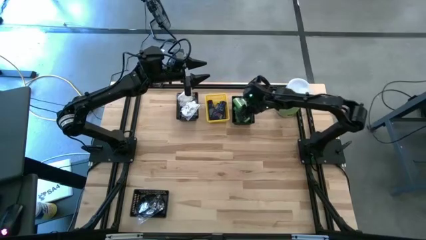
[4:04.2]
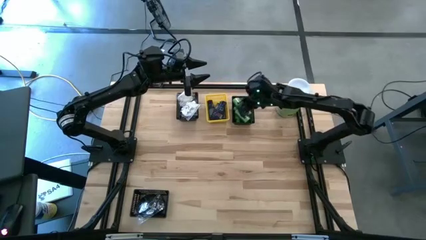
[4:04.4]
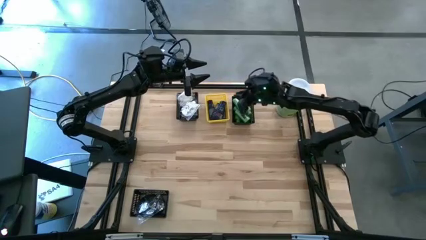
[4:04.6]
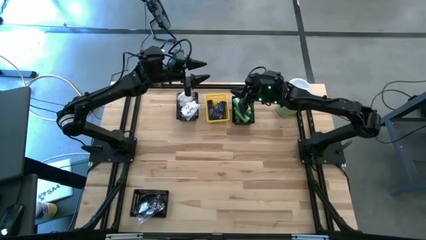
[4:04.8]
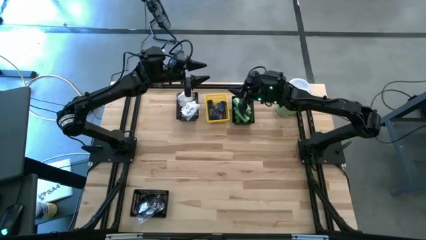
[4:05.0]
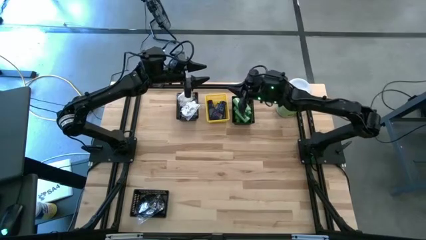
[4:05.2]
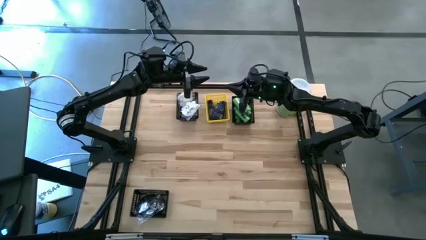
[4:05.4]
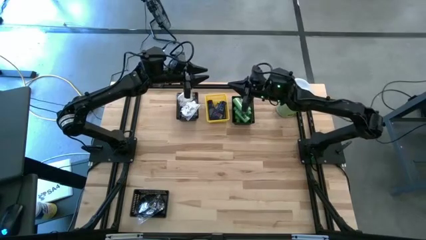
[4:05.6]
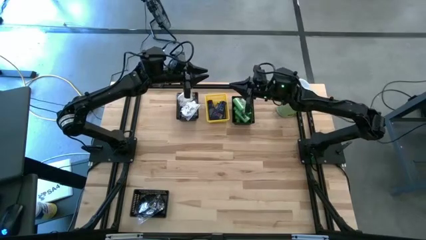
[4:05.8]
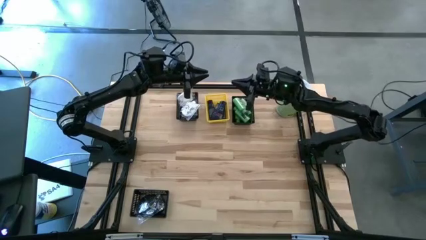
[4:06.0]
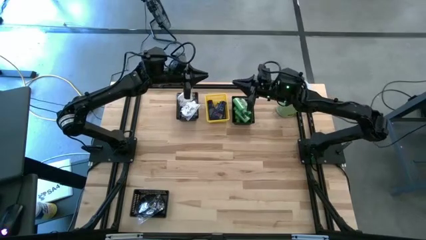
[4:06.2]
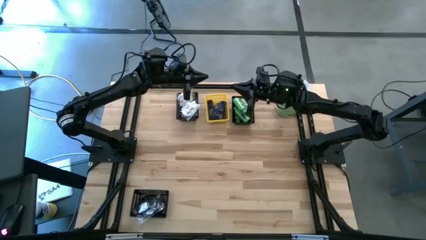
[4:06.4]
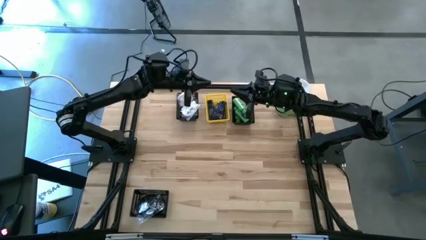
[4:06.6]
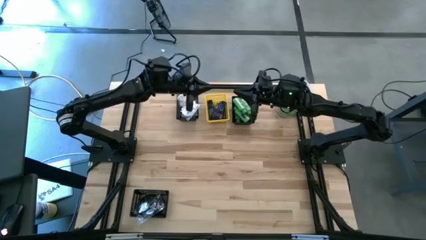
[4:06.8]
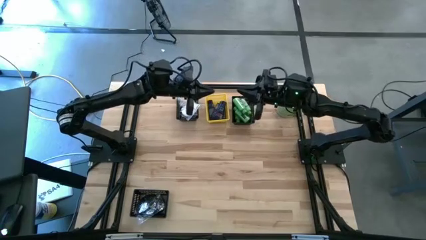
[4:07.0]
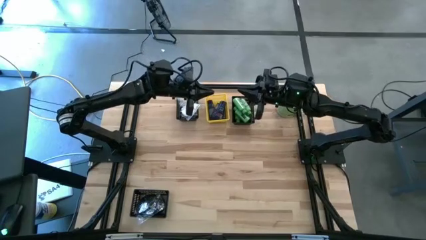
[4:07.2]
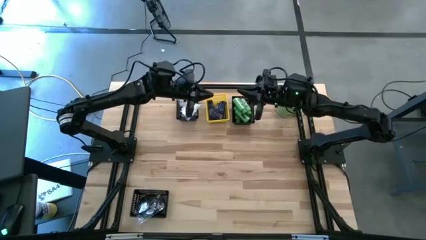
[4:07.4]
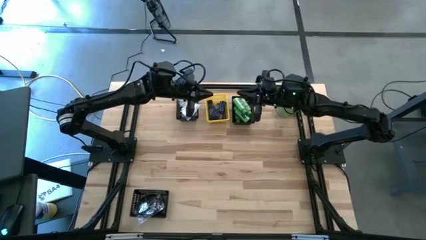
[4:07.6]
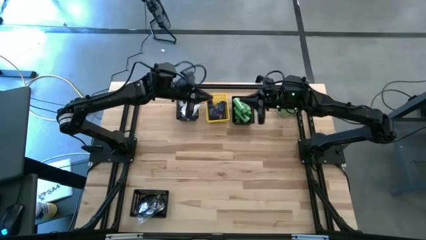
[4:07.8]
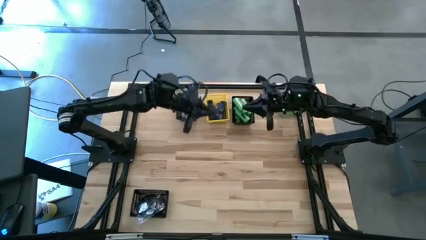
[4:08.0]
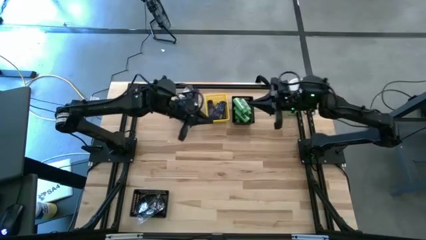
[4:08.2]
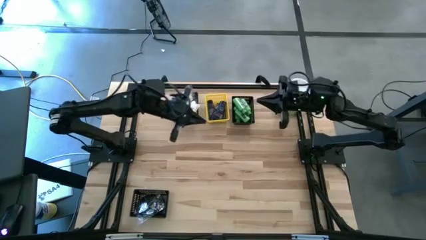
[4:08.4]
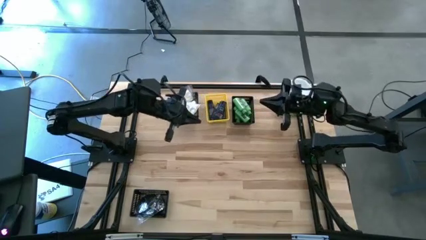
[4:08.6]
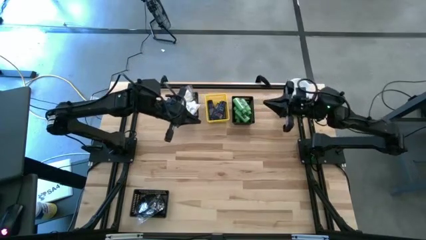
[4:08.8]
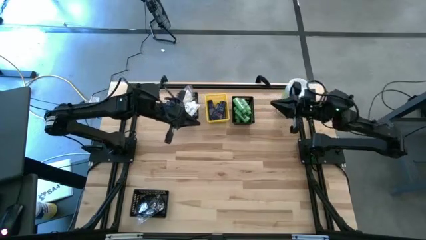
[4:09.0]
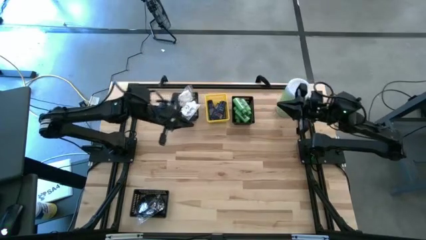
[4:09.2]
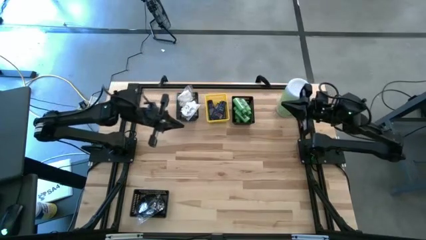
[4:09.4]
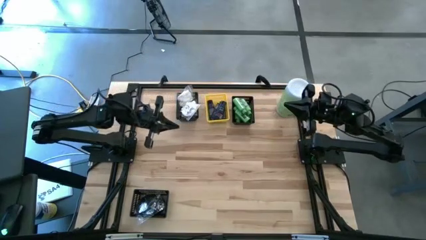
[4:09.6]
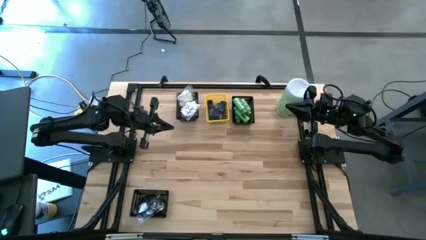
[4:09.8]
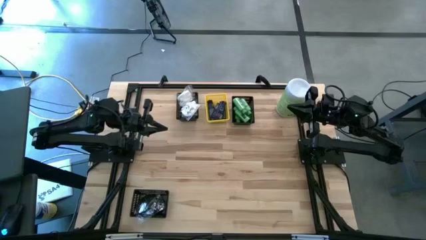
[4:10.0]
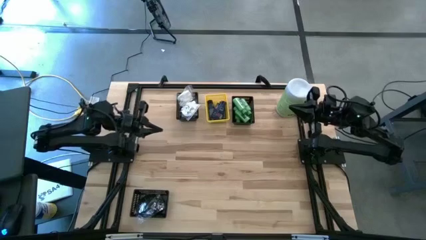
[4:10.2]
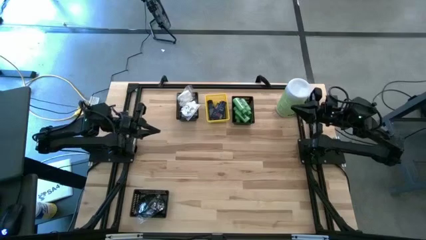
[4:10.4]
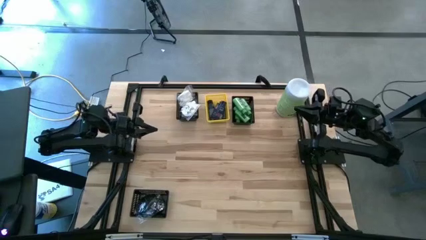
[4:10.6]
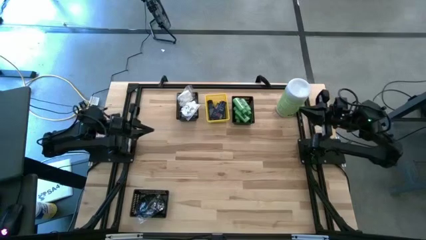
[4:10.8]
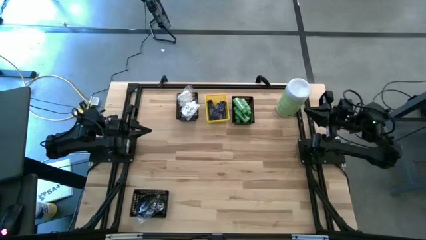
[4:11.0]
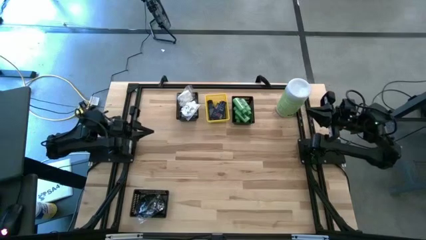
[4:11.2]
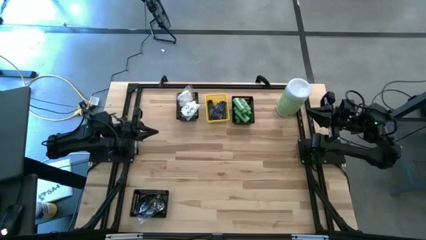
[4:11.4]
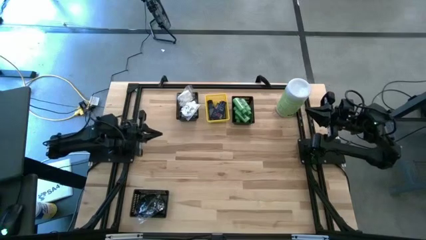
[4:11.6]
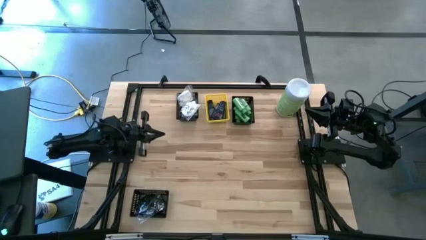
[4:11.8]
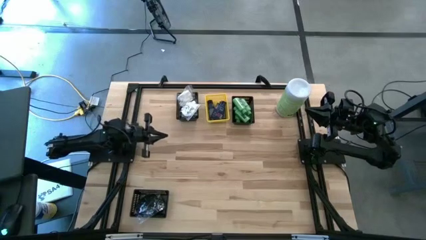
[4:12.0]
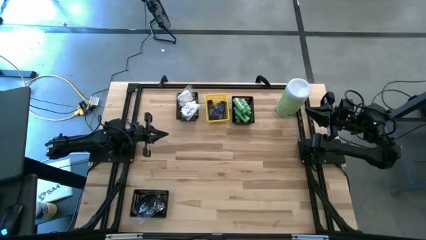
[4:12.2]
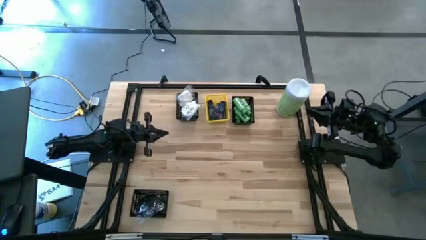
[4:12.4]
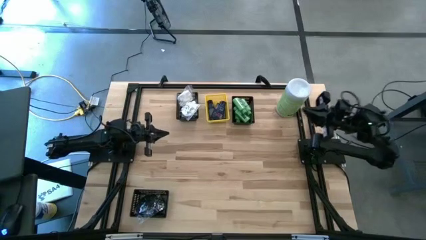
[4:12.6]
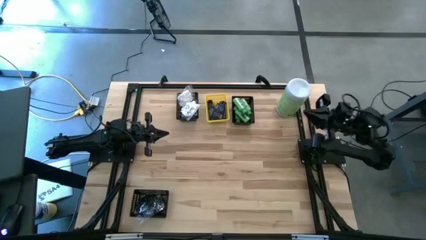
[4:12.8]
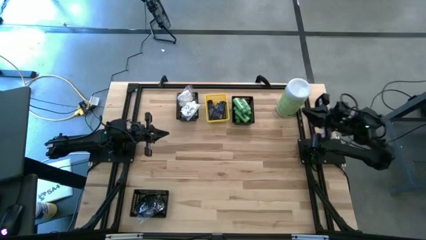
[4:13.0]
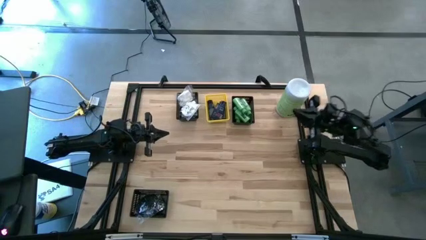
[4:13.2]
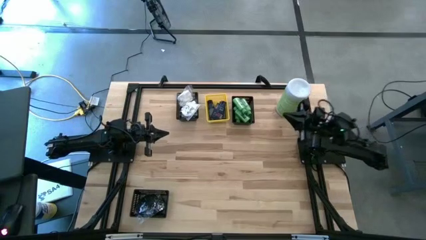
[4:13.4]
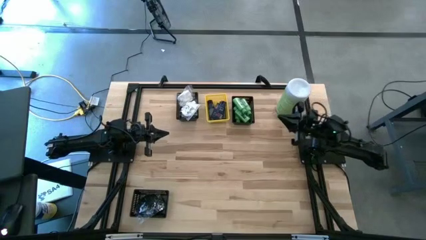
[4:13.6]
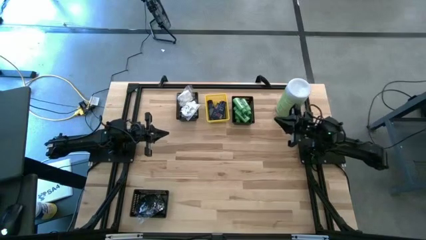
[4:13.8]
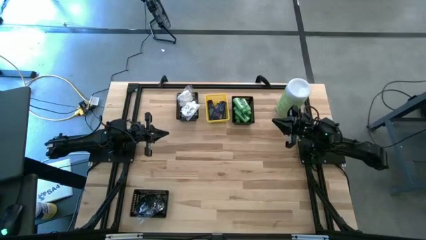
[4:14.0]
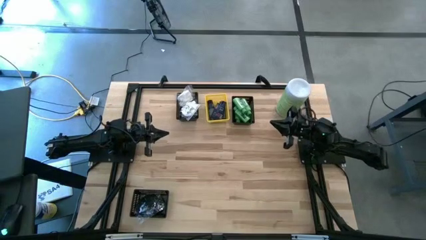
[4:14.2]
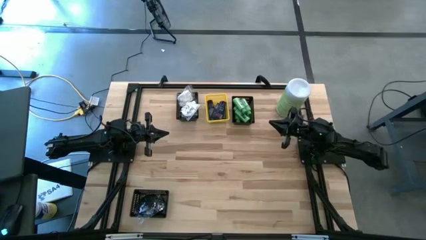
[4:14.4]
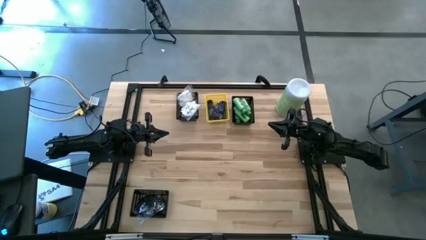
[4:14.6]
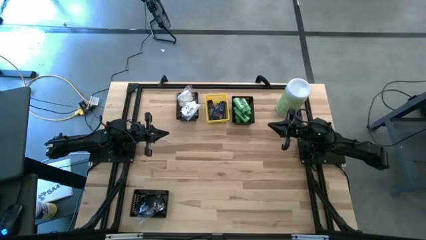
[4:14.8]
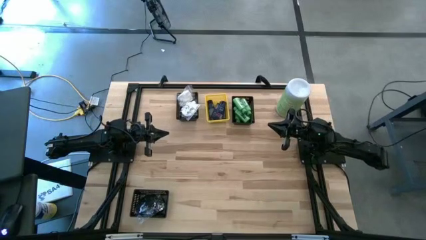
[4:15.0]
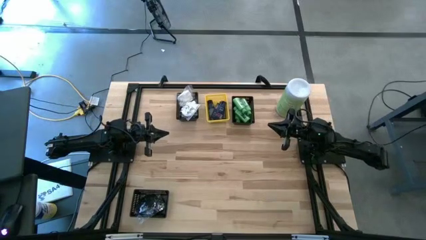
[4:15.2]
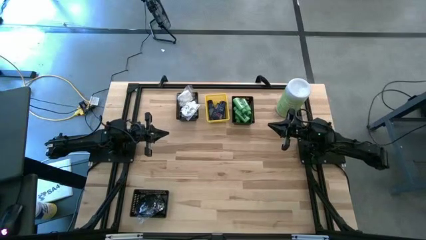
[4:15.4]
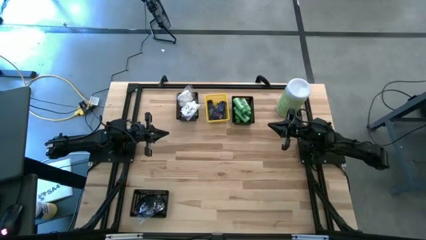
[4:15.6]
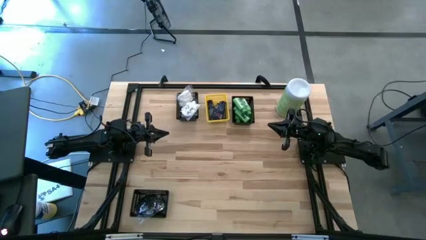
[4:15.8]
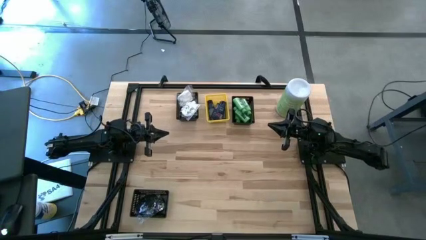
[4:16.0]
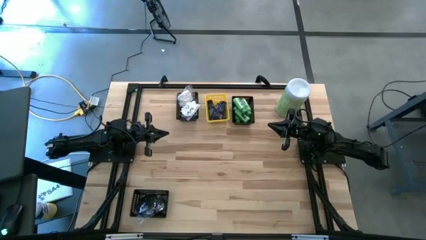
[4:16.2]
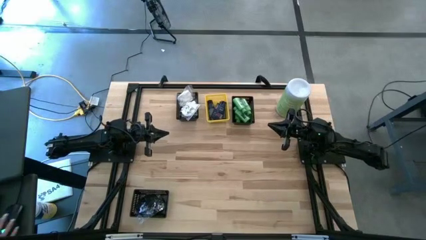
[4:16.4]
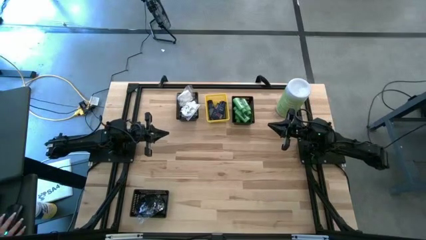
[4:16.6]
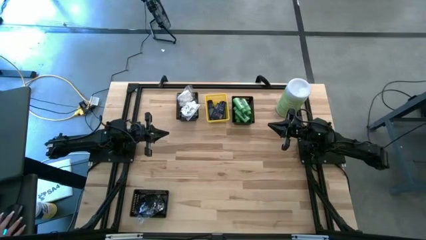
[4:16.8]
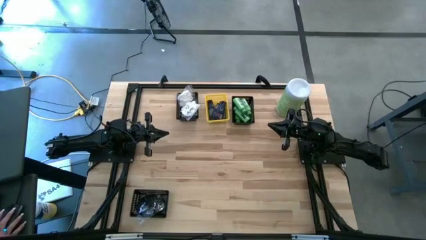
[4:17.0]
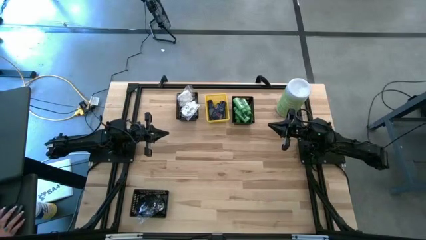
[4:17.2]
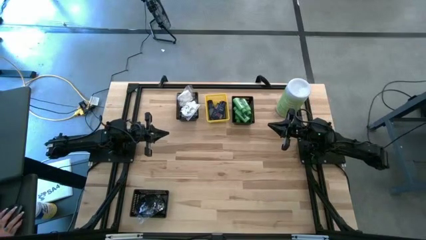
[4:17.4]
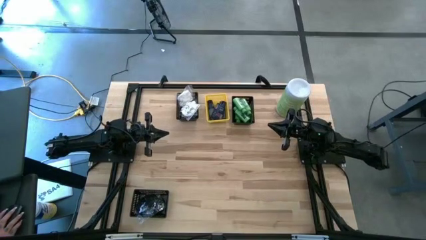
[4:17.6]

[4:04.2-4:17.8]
Task: Pick & Place Travel size toiletries
Return to Home Position

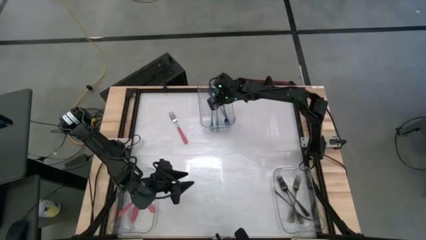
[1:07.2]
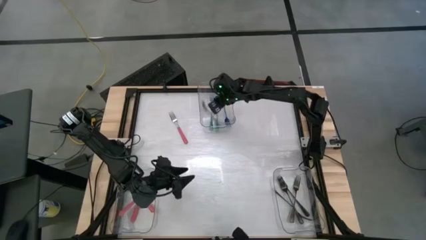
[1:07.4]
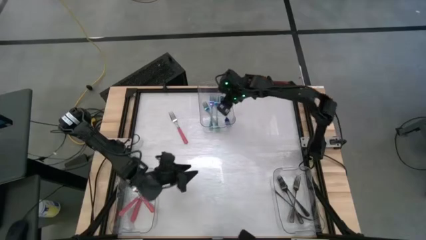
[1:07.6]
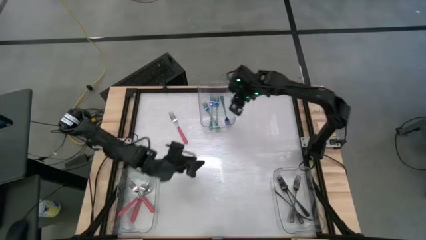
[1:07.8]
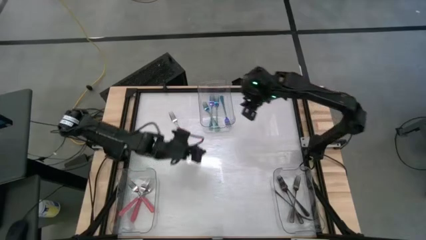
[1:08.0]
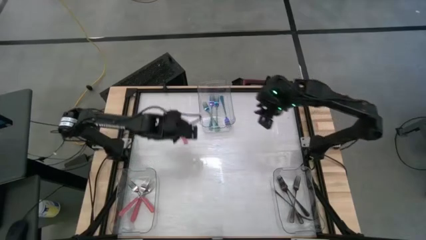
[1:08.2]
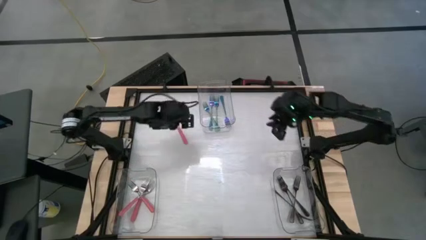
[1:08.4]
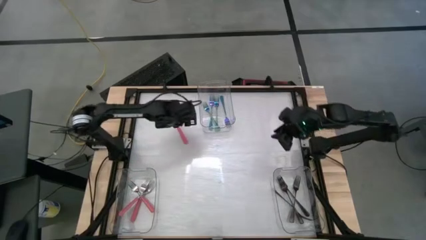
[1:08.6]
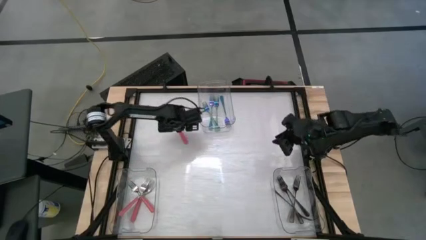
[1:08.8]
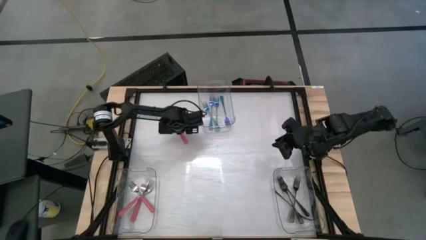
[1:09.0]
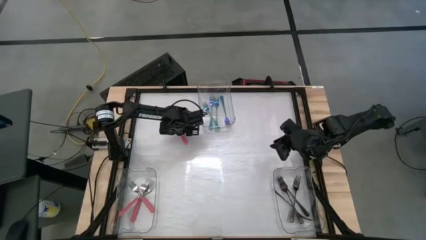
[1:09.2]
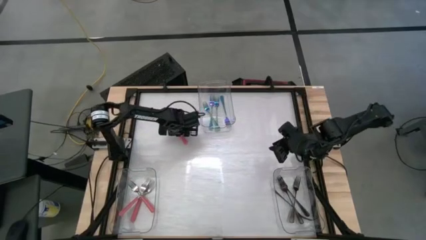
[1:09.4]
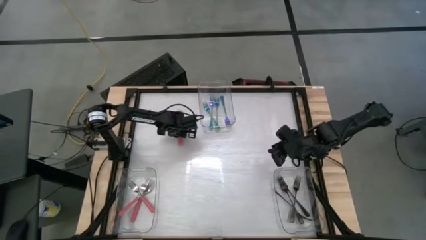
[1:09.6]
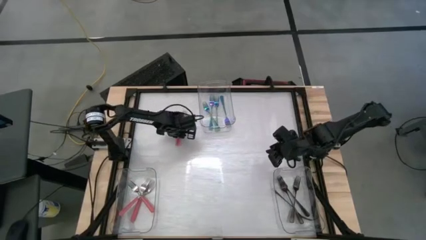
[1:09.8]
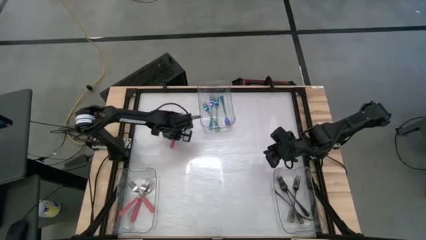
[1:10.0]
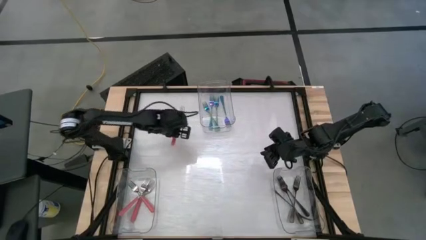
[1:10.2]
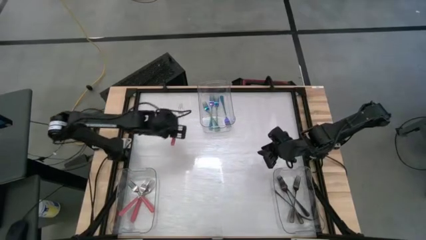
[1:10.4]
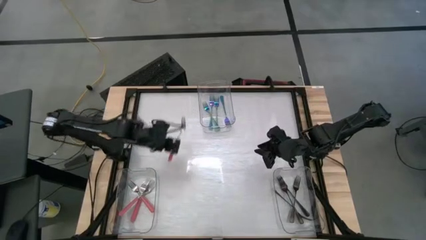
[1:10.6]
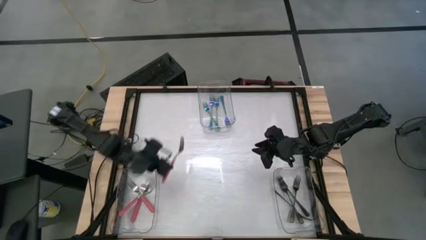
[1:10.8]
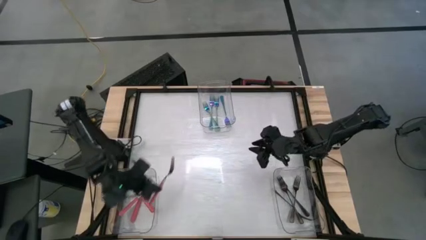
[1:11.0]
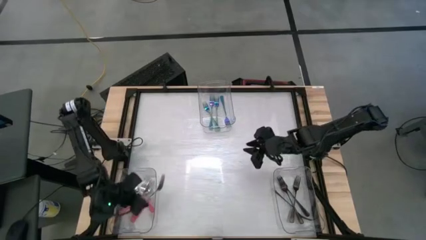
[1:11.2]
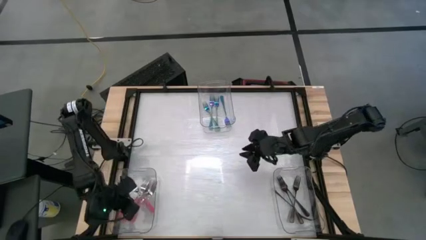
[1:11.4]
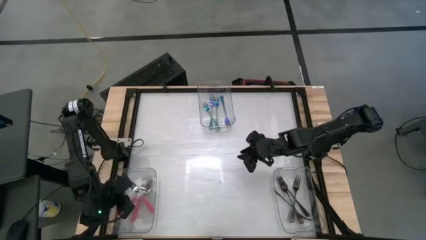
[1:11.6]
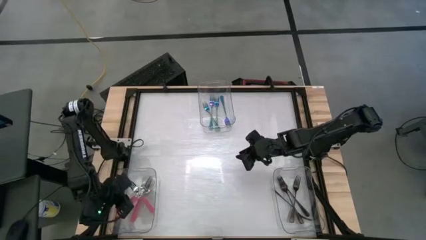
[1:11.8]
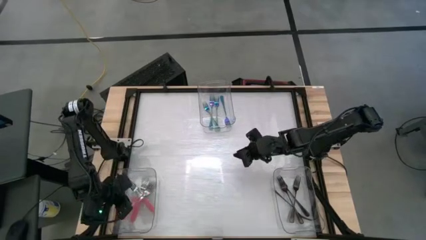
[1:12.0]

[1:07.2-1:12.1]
Task: Sort silverware by color (type)
Put the pink fork into the bottom left transparent bin
